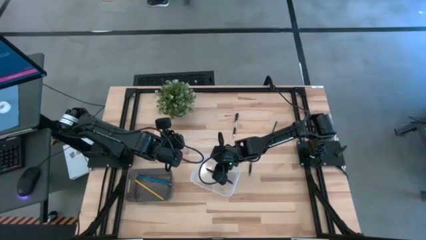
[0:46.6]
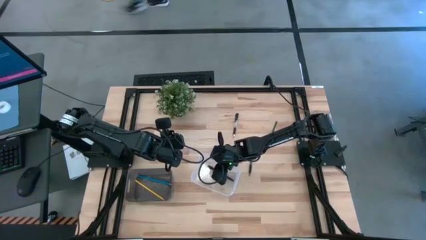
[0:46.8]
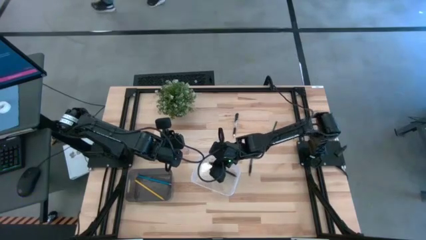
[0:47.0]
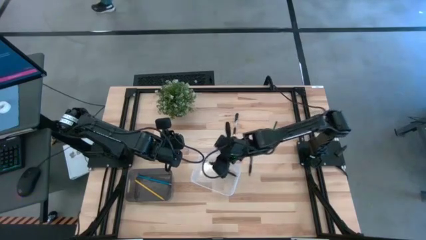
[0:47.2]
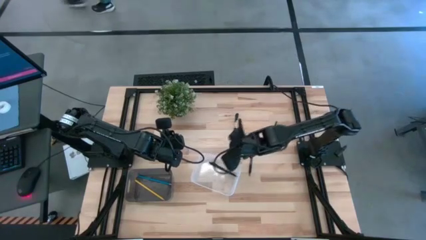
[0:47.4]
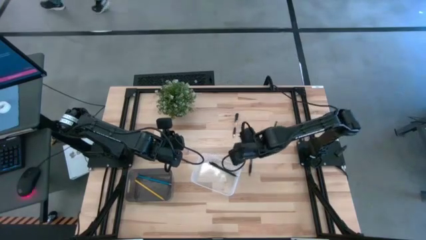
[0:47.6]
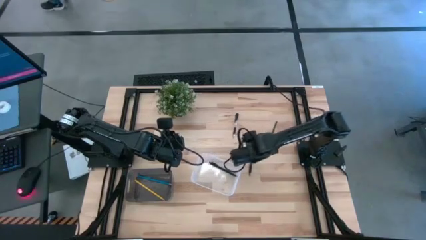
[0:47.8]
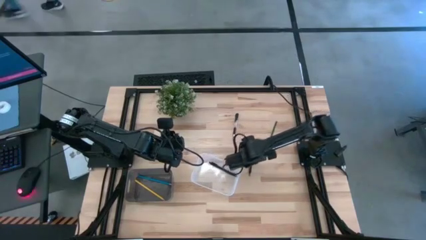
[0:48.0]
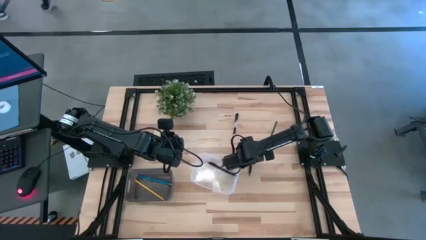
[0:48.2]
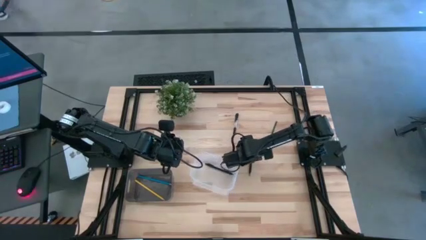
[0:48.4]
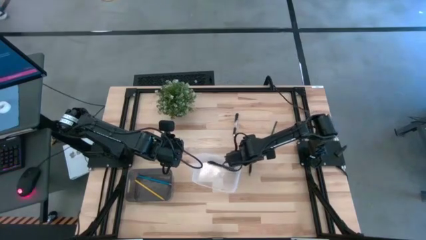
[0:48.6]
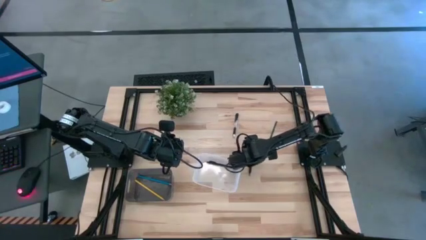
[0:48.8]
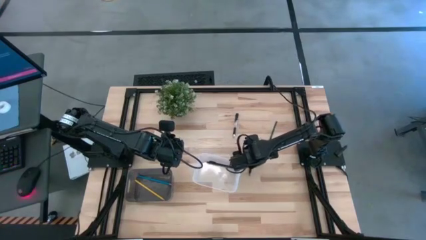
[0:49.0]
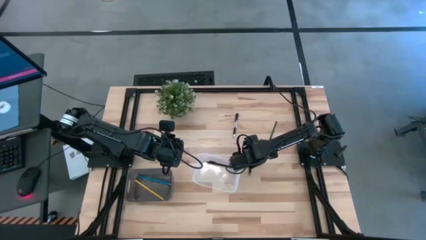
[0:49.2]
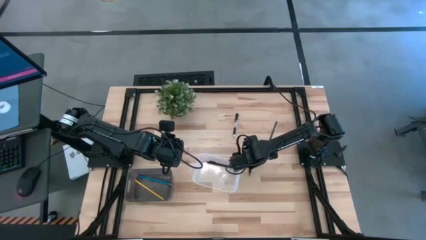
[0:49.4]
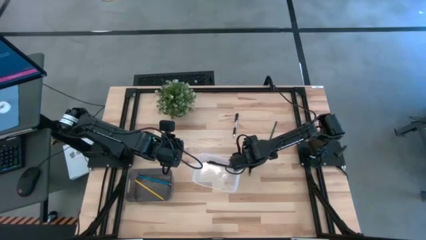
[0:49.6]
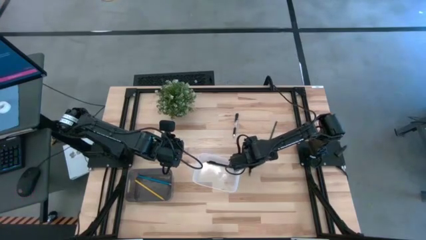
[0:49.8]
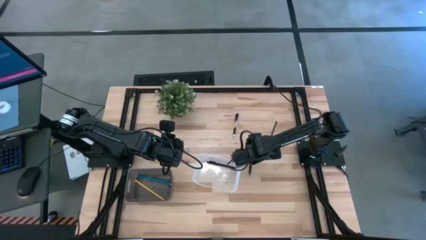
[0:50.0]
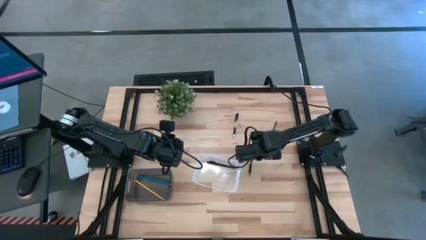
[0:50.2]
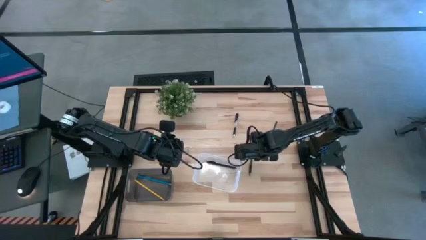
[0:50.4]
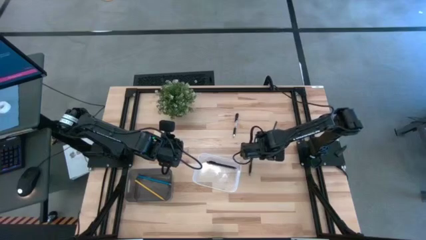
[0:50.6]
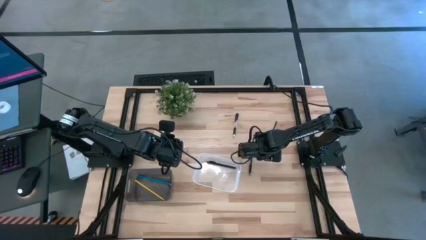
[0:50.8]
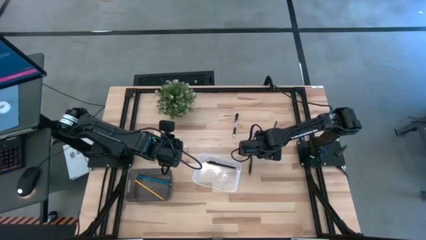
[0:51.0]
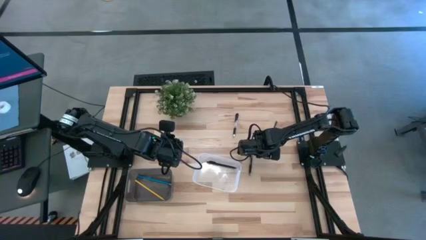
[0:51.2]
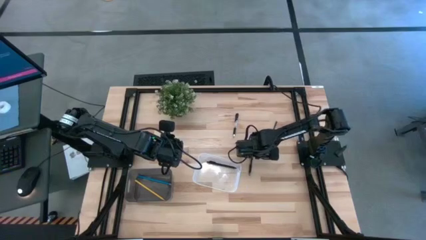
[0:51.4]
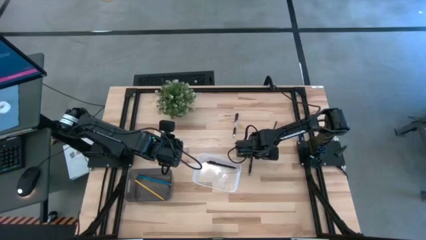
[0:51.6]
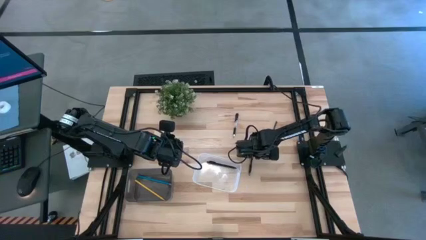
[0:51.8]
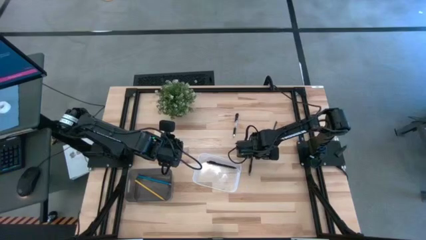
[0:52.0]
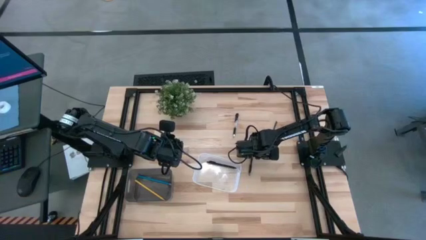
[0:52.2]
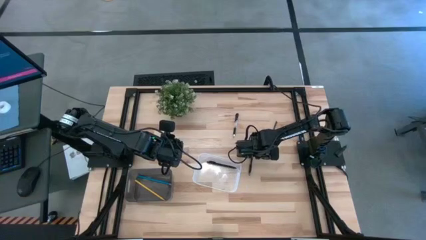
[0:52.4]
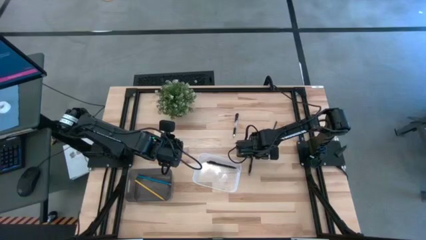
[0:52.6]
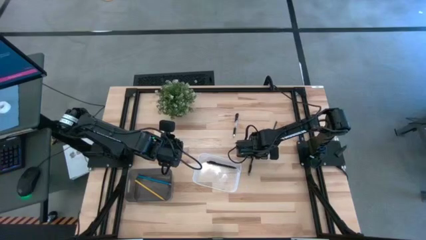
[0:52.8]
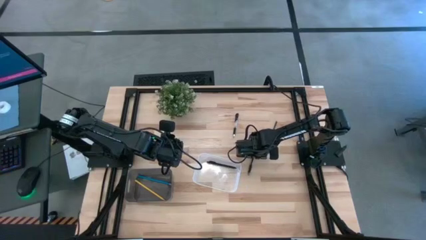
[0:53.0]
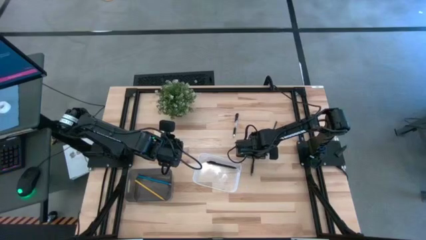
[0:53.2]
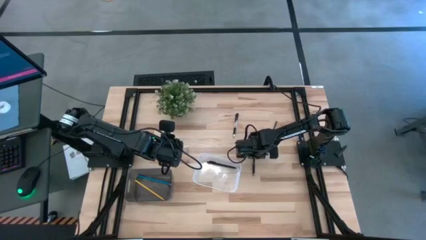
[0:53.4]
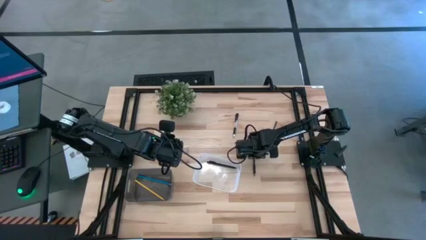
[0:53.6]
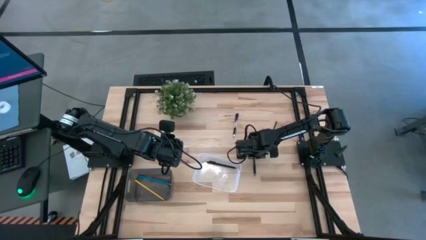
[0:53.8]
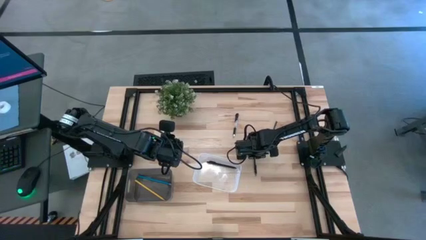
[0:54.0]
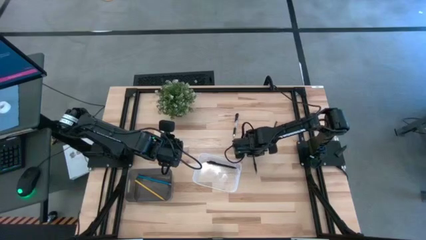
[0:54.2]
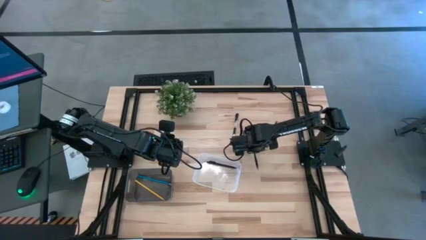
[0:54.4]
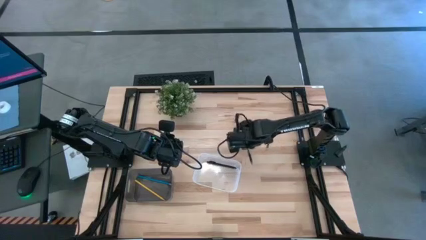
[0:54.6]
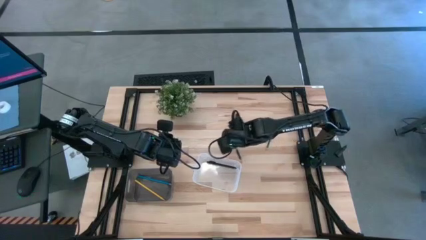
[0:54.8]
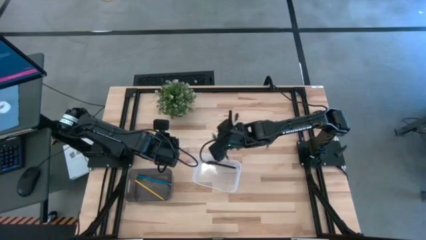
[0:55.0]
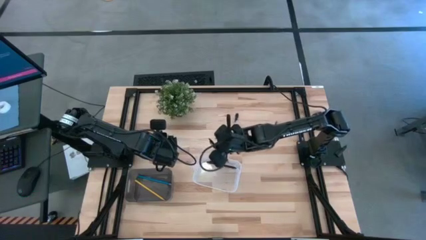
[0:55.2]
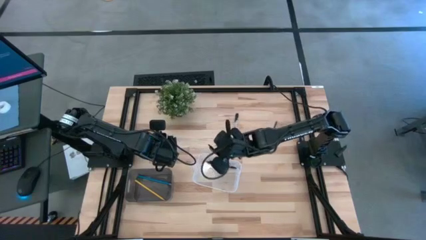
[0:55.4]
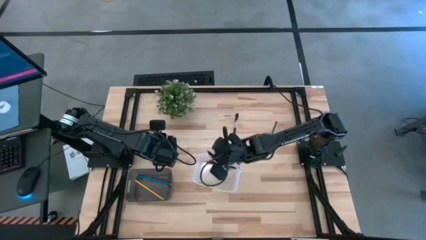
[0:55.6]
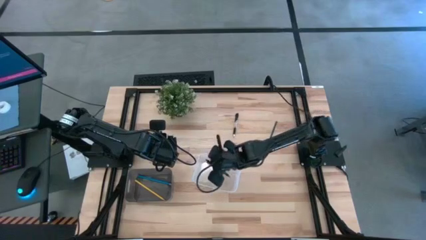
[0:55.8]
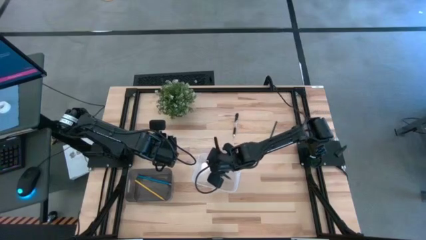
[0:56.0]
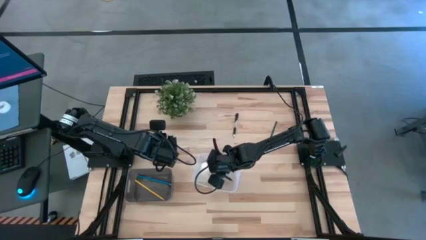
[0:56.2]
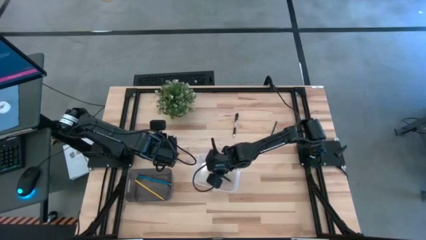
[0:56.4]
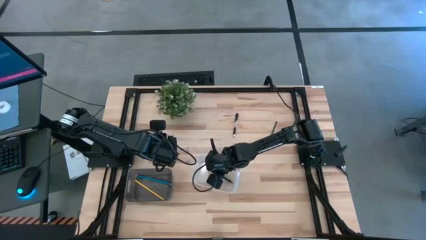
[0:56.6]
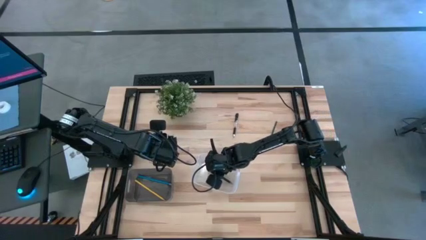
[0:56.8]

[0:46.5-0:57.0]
Task: Sort pens & pencils
Put the bottom black pen into the transparent bin

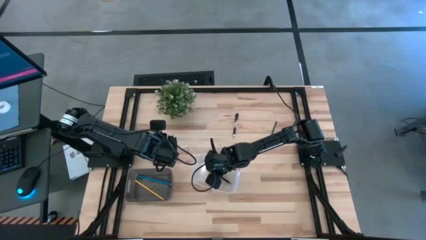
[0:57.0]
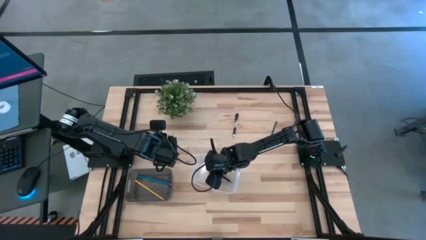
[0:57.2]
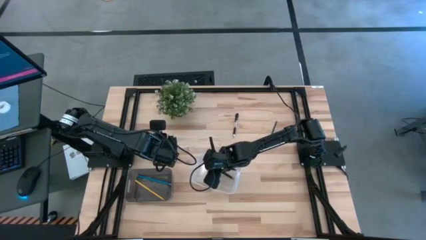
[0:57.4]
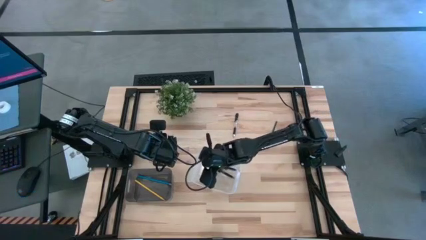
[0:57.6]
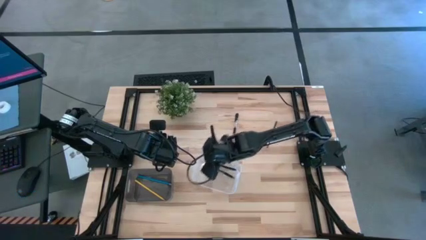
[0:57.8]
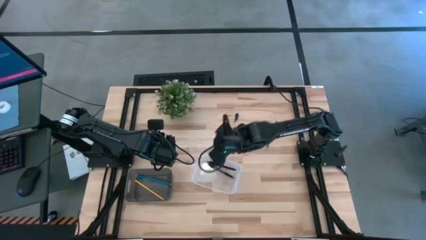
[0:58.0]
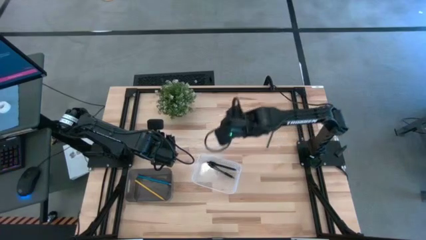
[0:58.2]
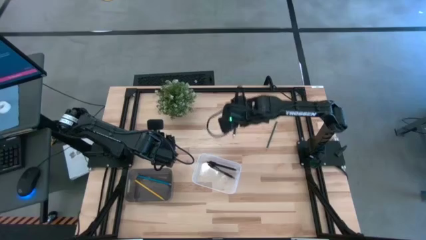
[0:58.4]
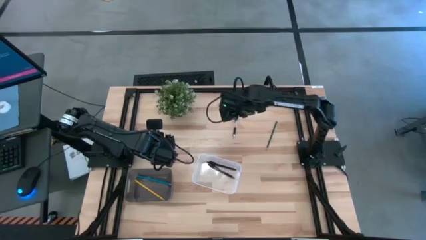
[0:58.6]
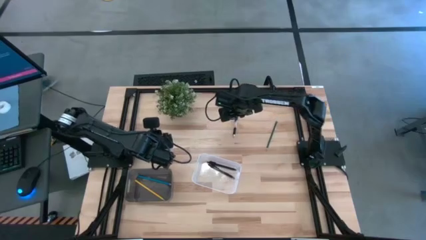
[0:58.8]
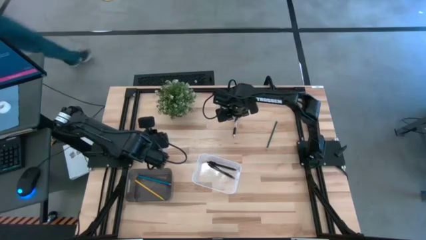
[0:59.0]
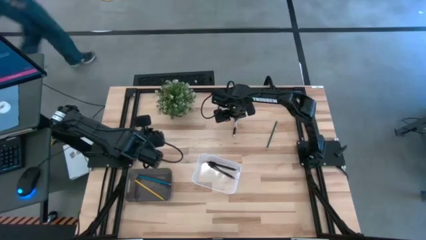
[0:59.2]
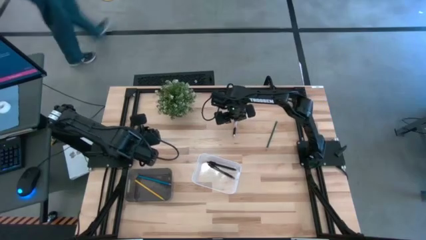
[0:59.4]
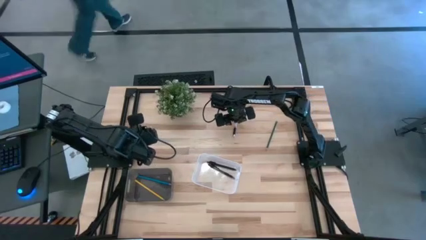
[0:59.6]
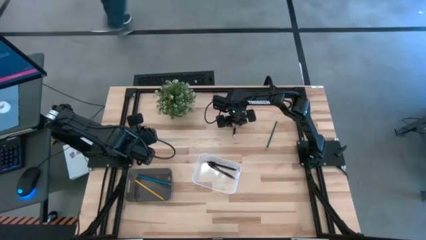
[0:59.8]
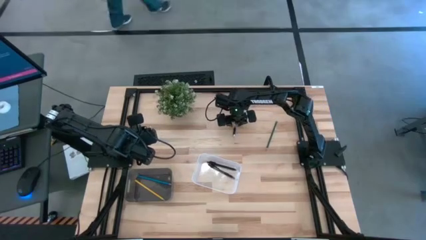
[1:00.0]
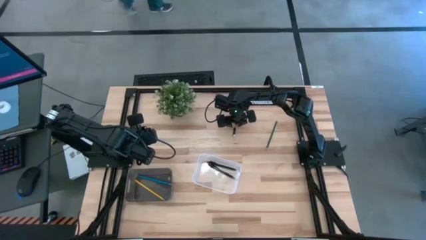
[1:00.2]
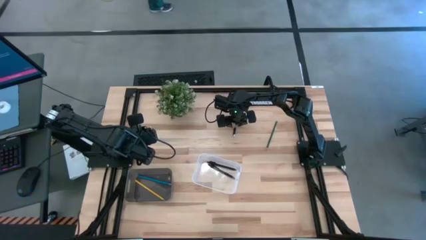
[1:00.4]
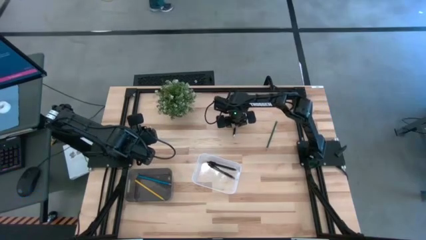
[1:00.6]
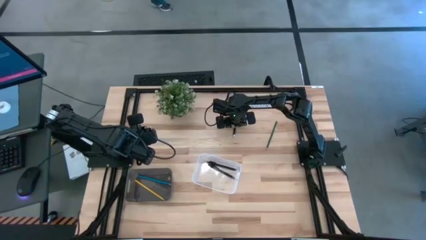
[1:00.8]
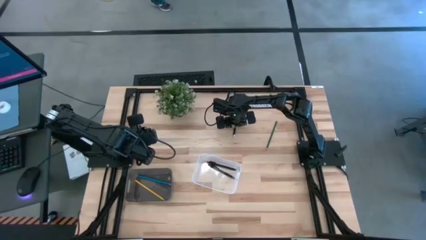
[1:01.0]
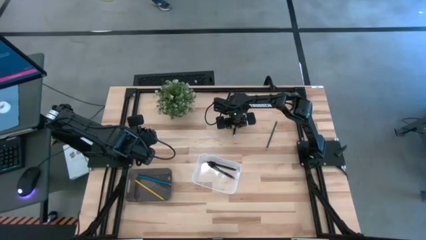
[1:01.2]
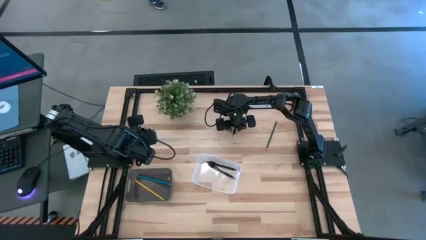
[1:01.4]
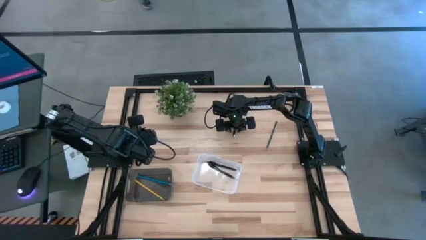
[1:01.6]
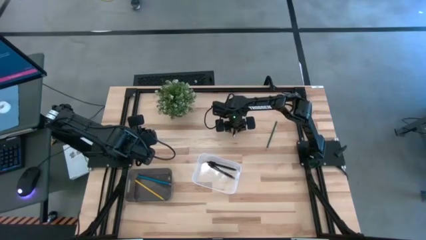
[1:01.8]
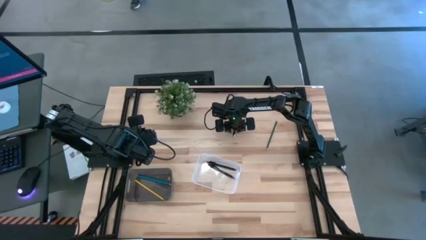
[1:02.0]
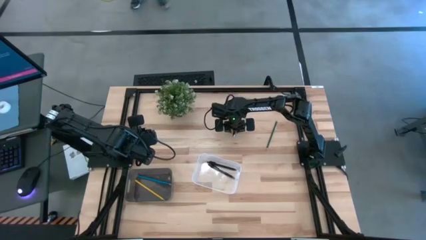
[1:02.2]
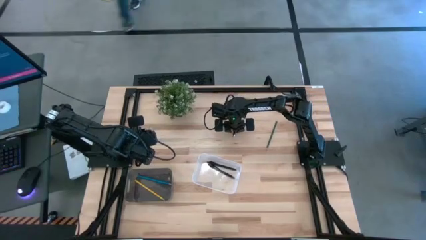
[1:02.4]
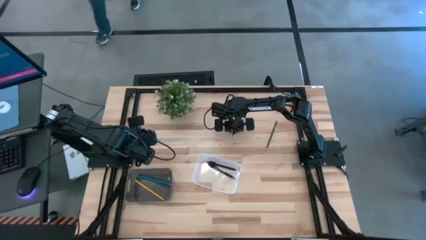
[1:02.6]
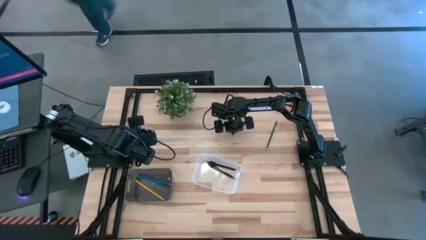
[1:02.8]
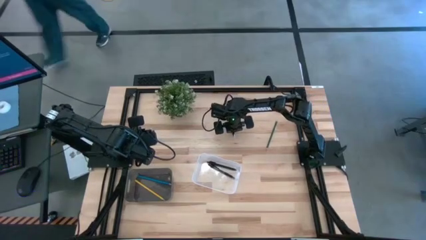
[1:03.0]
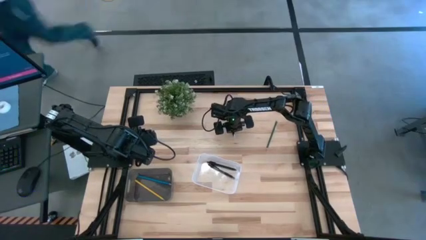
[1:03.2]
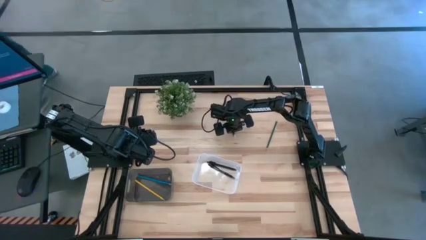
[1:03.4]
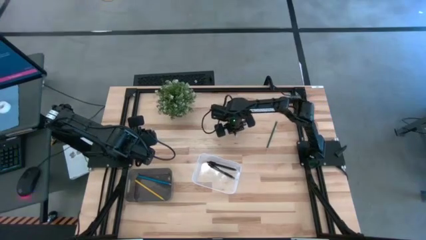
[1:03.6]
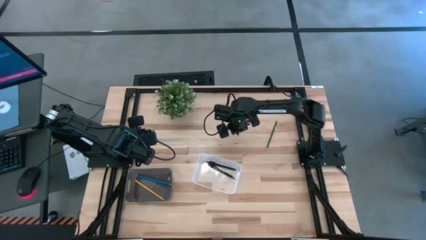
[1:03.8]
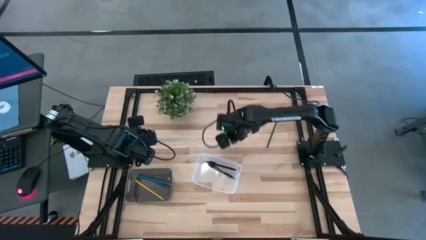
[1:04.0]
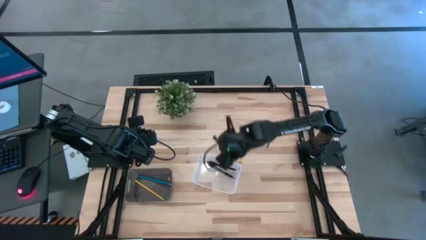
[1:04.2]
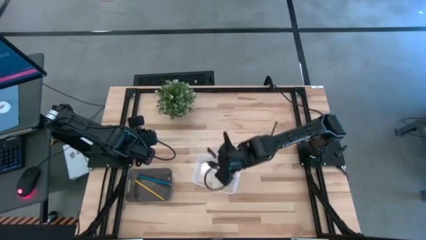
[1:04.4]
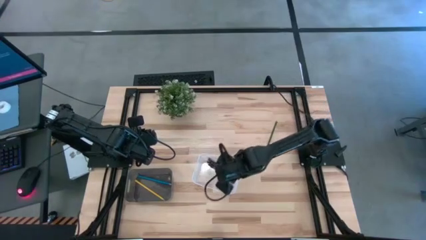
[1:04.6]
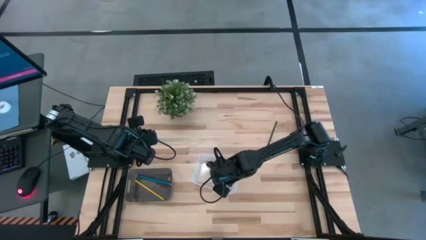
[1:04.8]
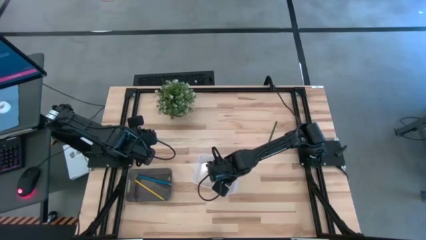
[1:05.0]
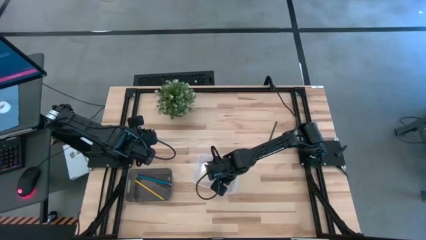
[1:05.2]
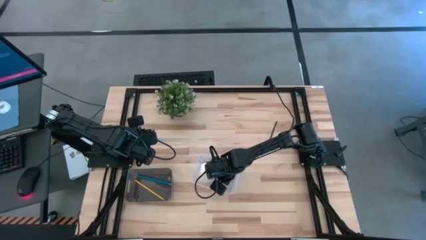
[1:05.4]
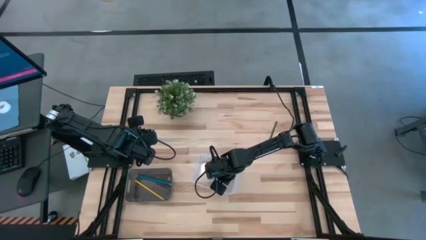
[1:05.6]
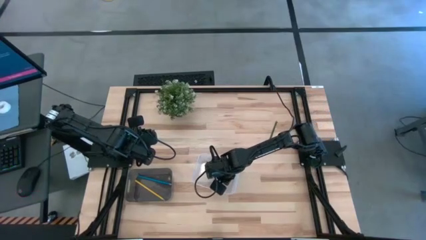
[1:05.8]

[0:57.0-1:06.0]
Put the black pen into the transparent bin
